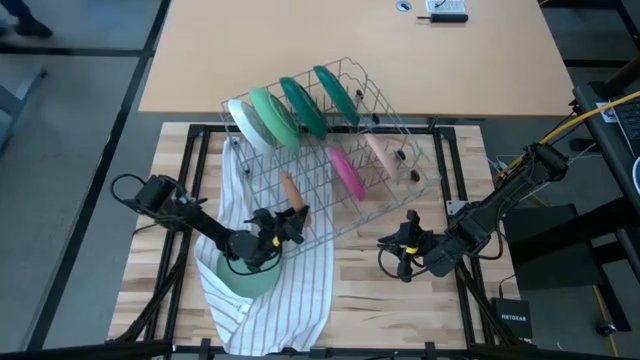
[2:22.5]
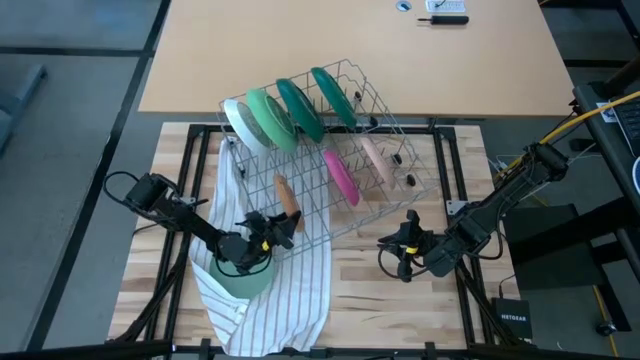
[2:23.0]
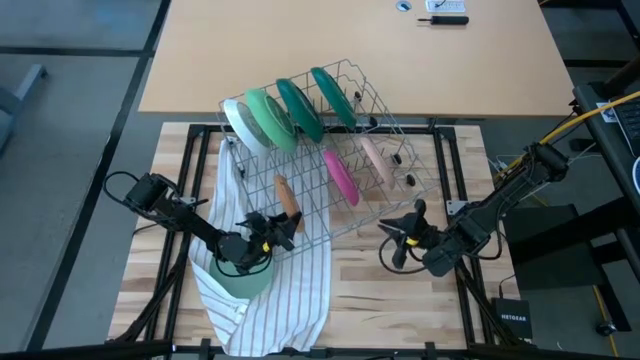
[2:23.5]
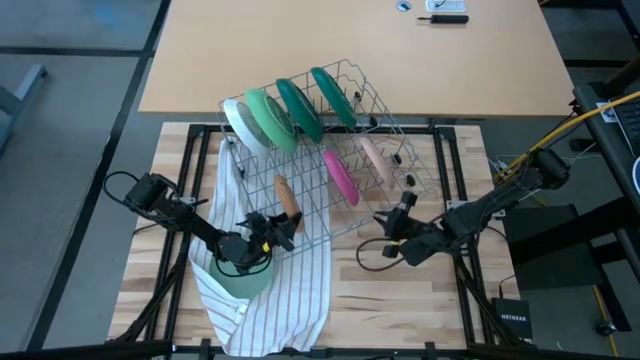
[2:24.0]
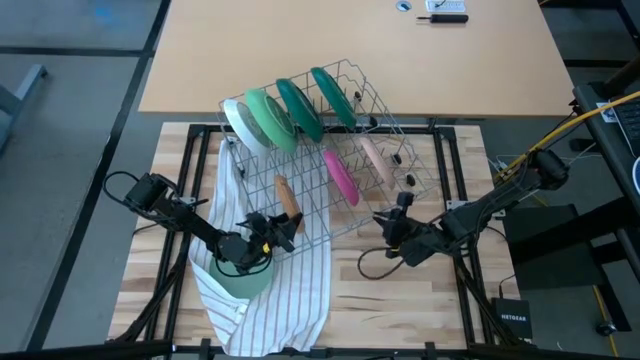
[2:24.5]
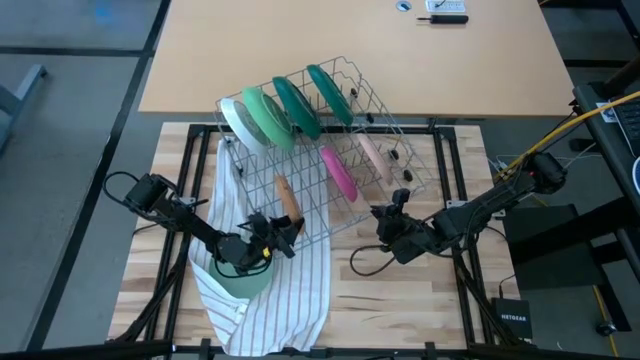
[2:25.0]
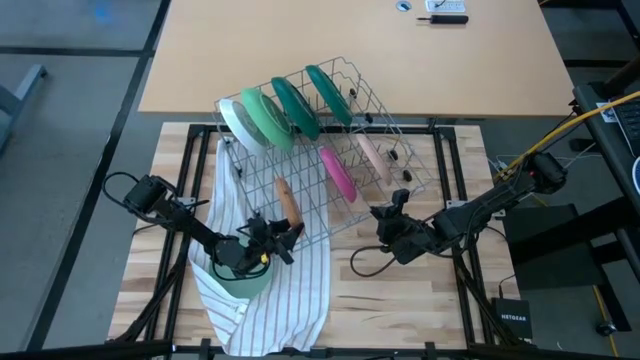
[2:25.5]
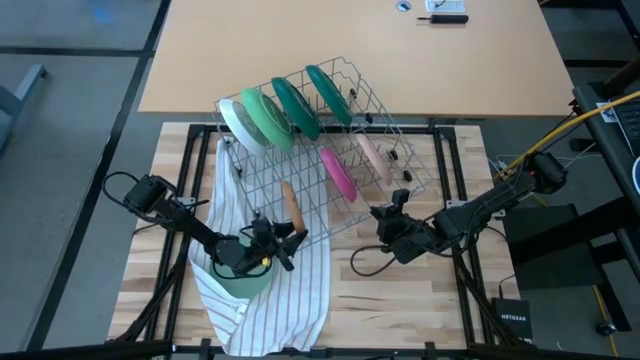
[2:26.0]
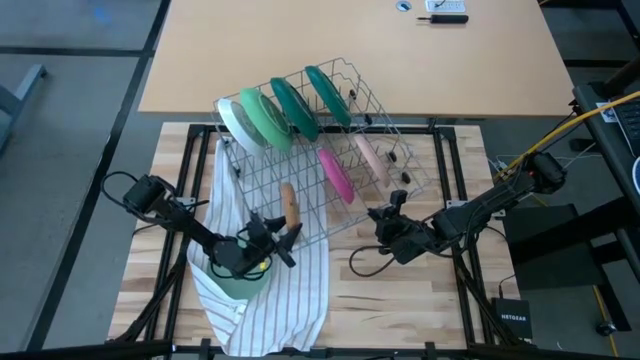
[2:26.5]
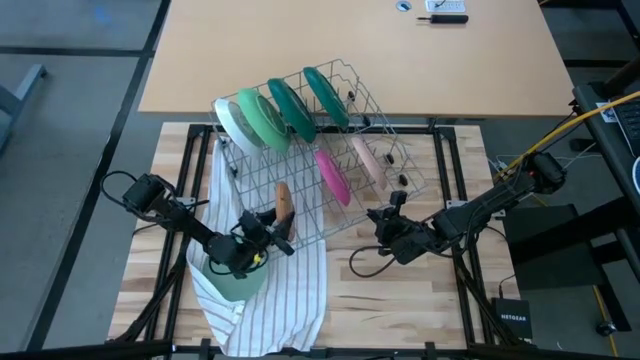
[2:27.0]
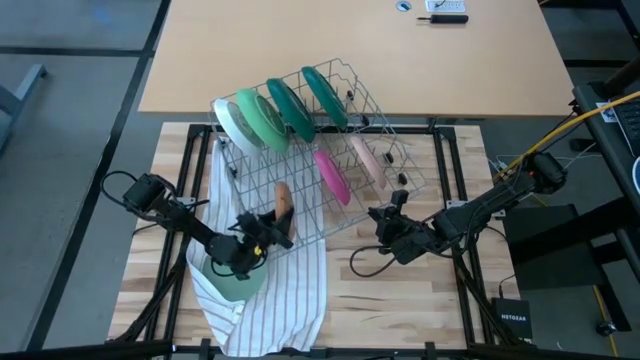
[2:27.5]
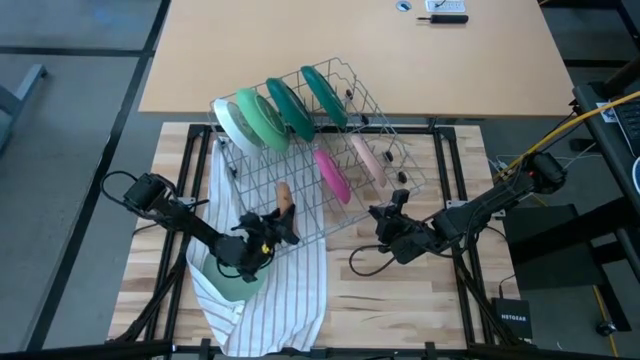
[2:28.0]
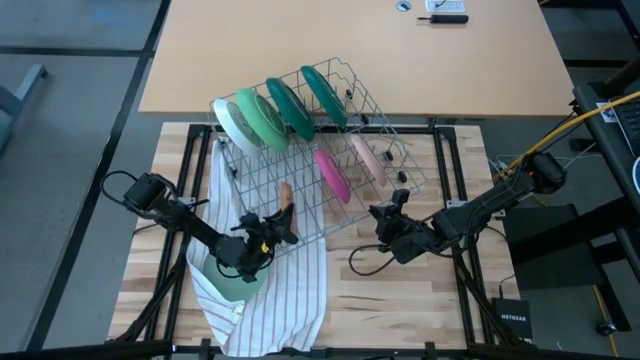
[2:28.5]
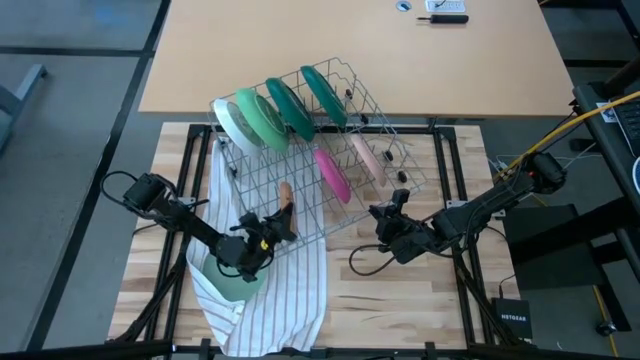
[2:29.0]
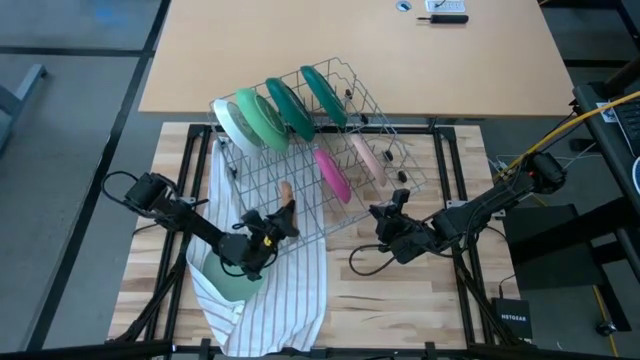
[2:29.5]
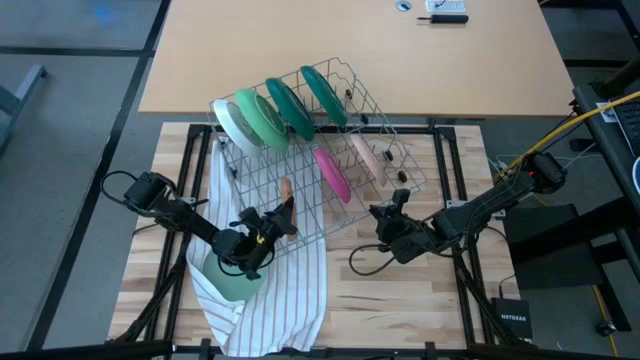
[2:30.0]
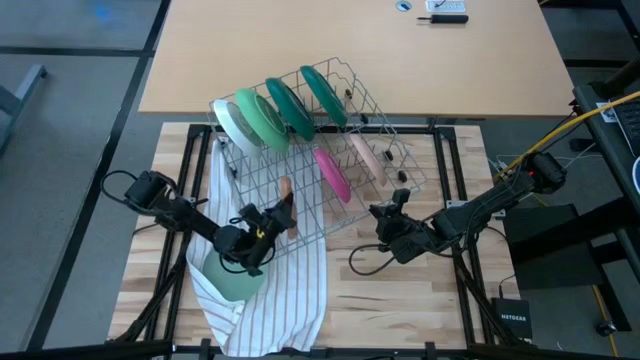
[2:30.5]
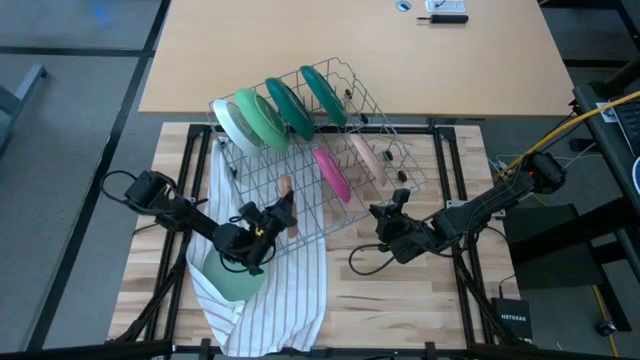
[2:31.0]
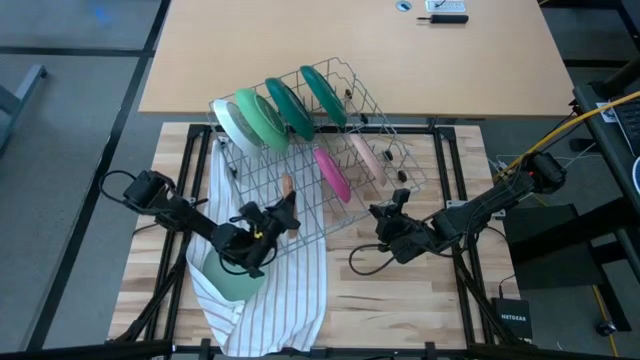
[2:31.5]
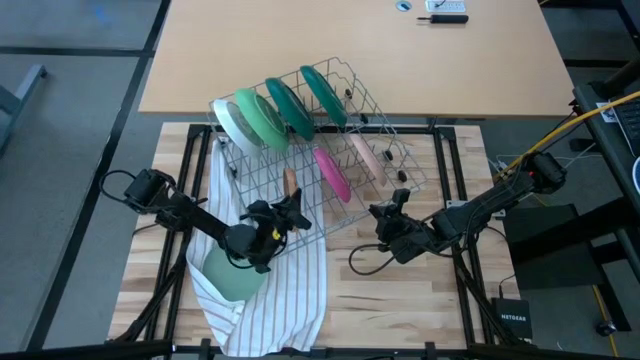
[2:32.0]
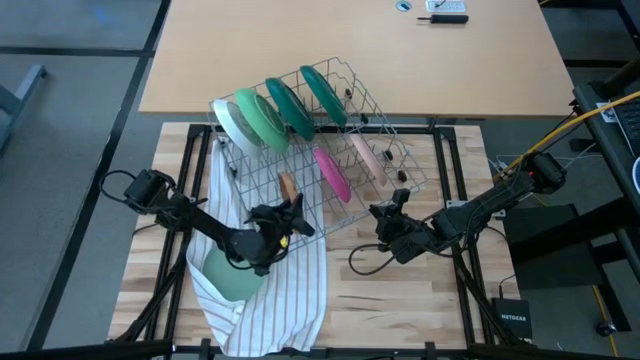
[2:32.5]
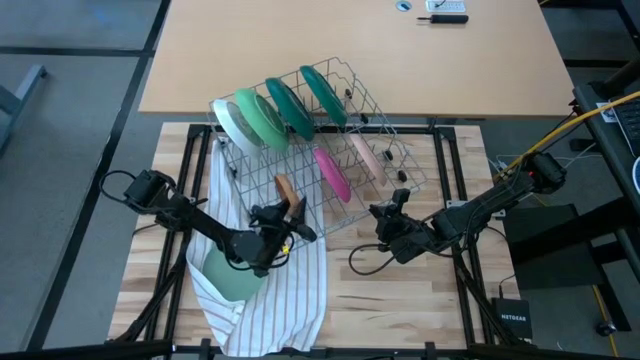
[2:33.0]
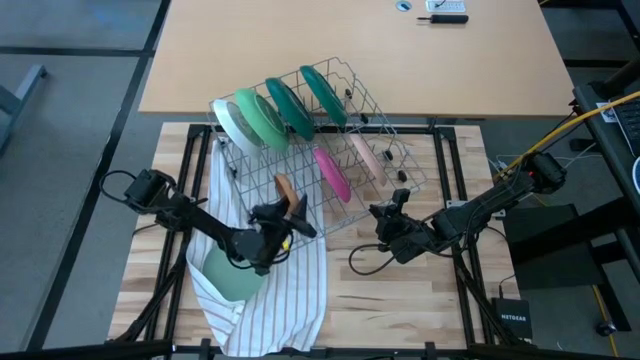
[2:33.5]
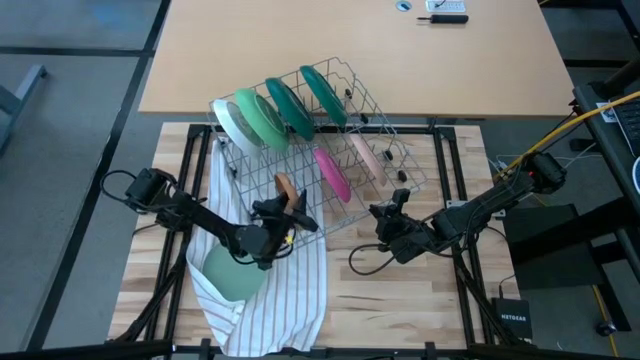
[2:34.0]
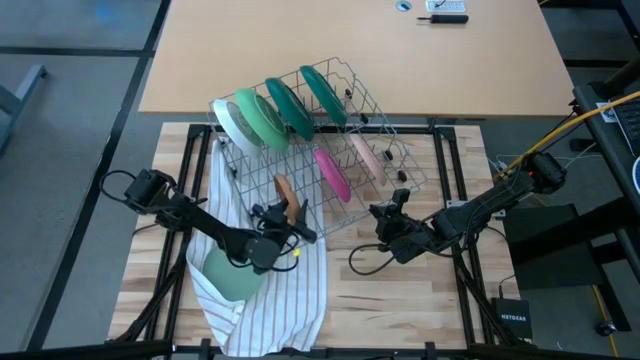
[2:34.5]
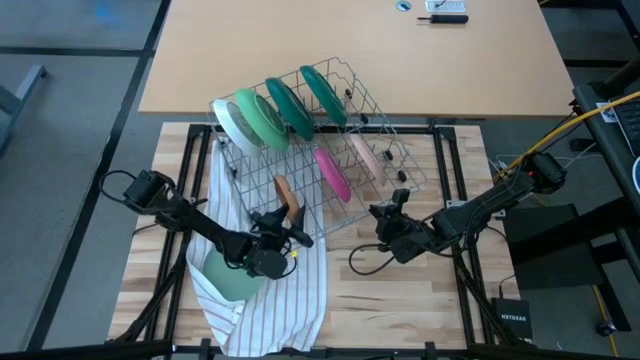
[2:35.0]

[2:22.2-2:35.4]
Task: Sort dishes
Put the brown plate in the dish rack

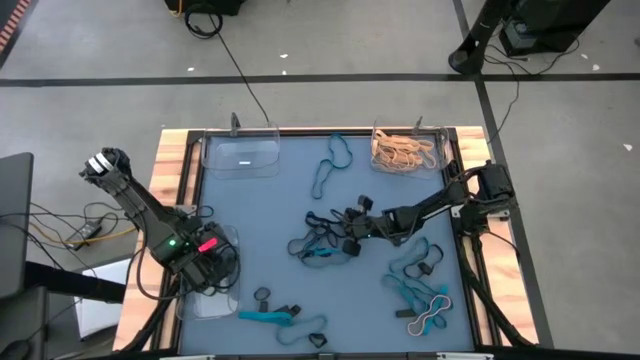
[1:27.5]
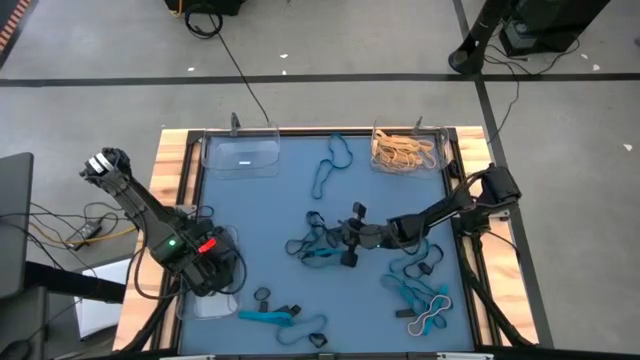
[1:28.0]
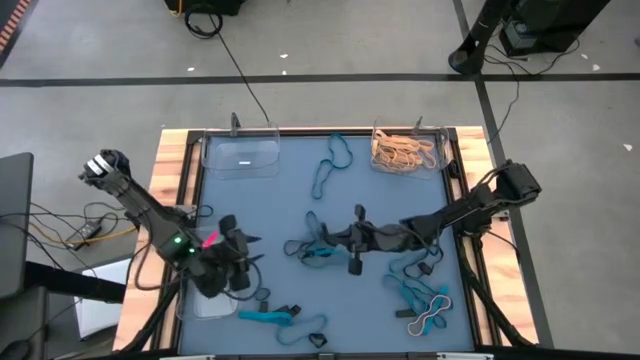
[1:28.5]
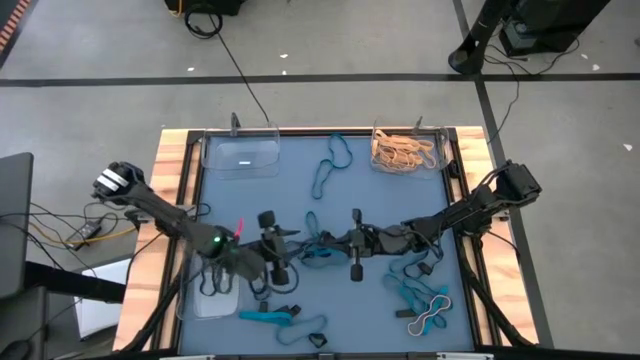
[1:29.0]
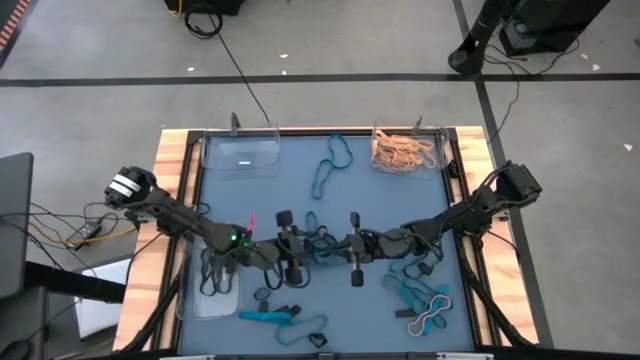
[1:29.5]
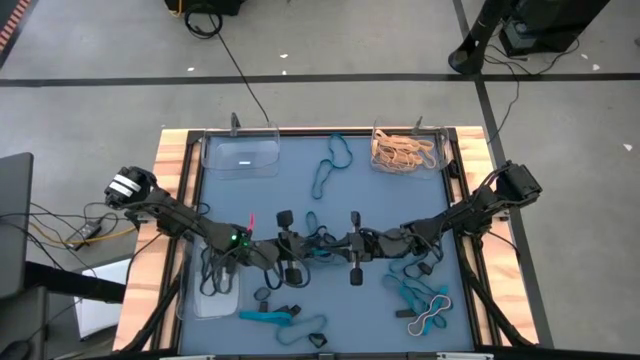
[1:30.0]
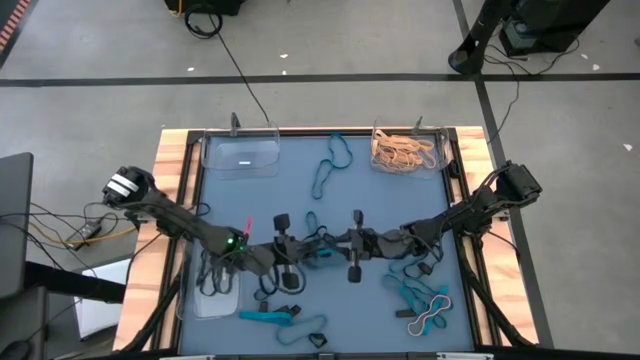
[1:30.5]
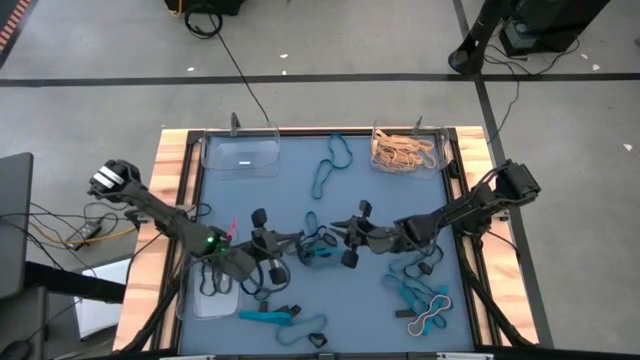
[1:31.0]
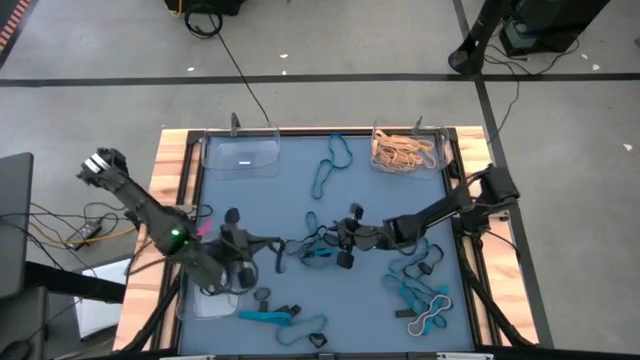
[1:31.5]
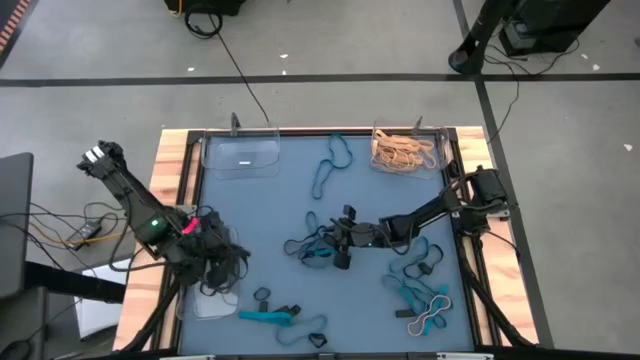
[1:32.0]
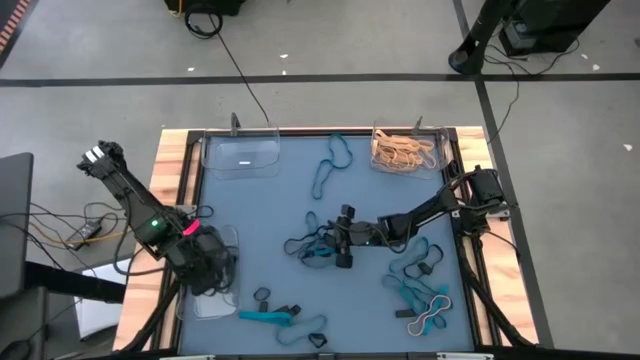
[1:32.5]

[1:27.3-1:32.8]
Task: Sort rubber bands into baskets
Put the big black rubber band into the bottom left transparent bin
